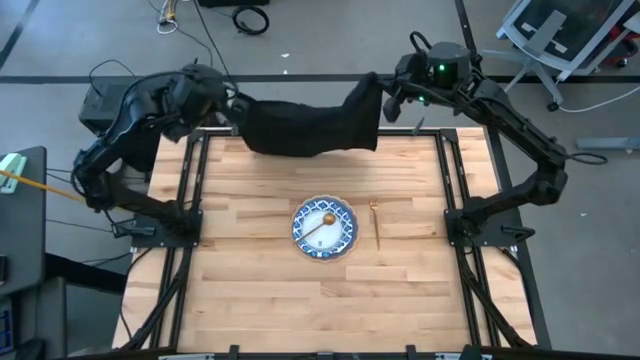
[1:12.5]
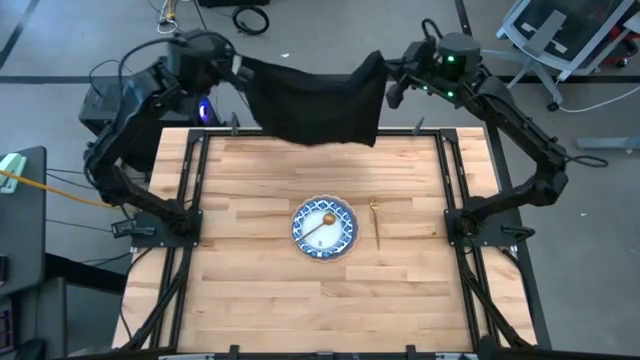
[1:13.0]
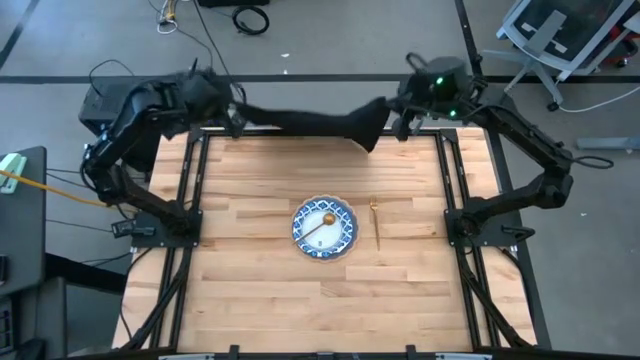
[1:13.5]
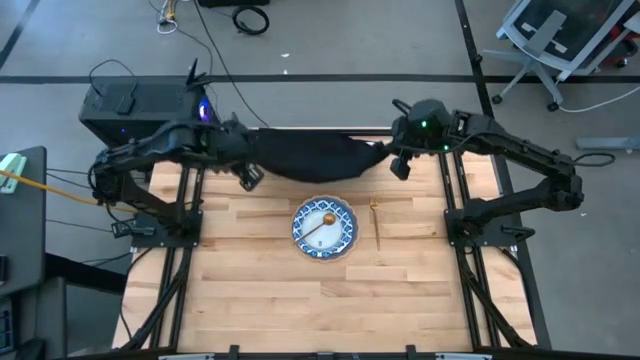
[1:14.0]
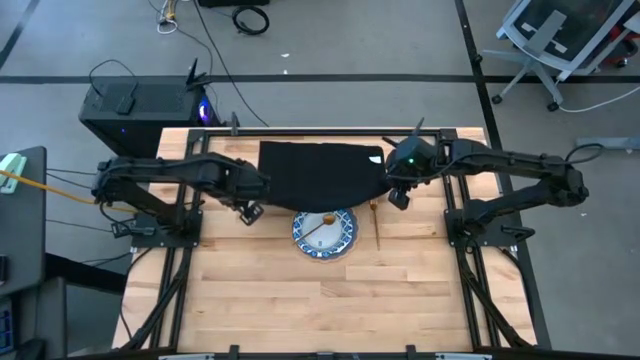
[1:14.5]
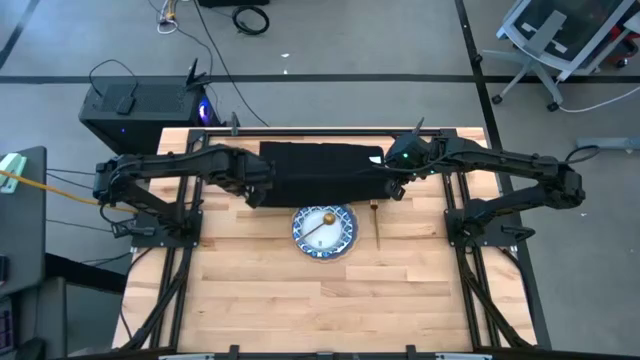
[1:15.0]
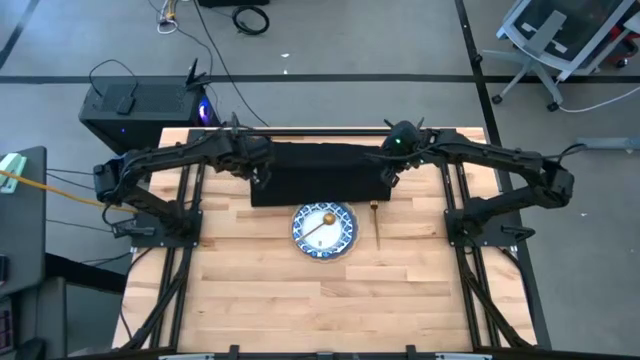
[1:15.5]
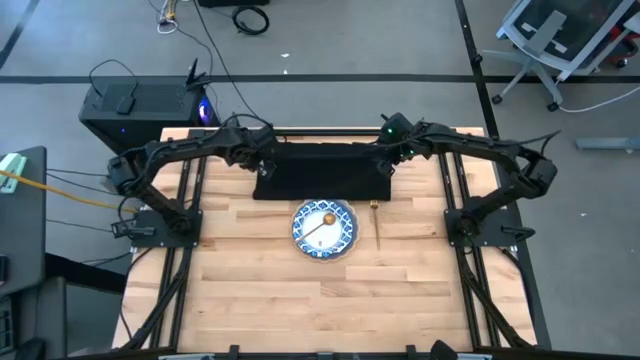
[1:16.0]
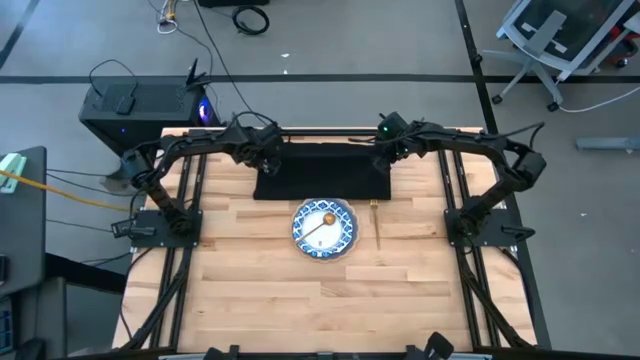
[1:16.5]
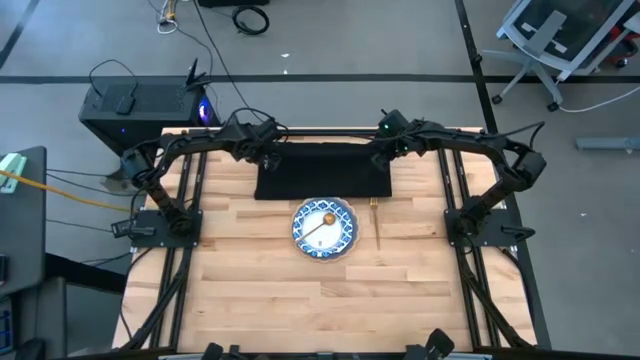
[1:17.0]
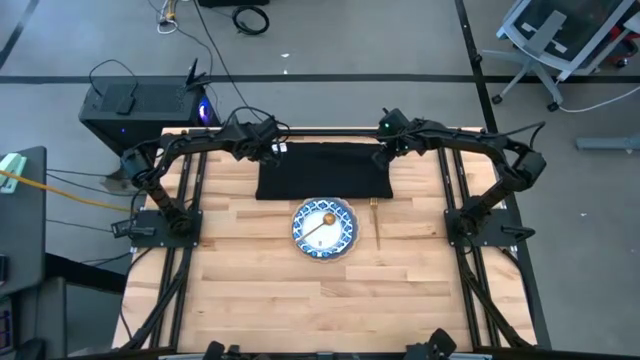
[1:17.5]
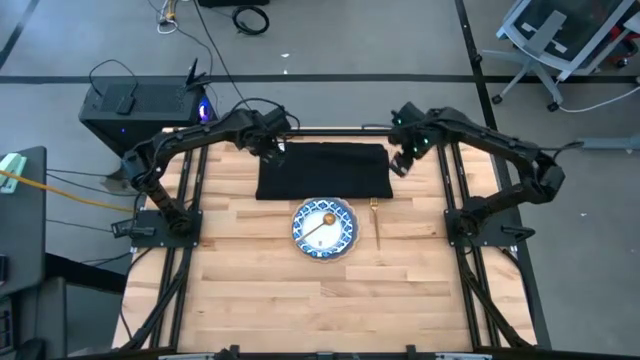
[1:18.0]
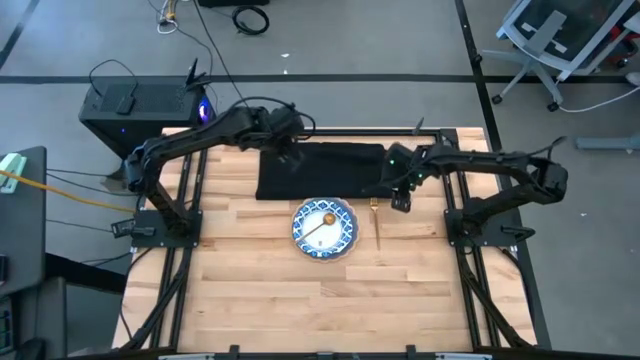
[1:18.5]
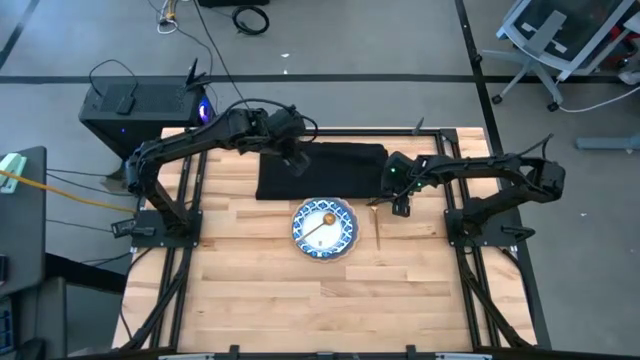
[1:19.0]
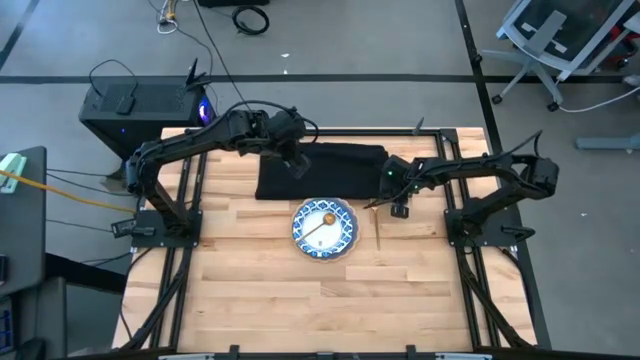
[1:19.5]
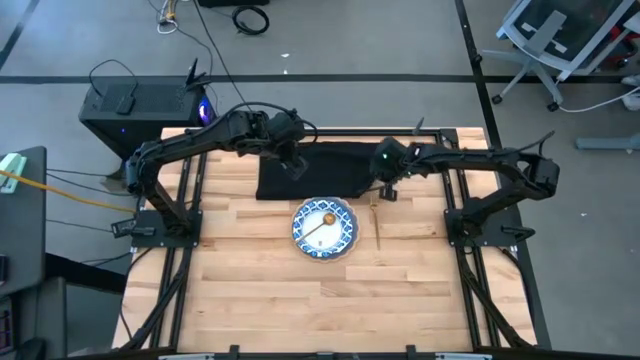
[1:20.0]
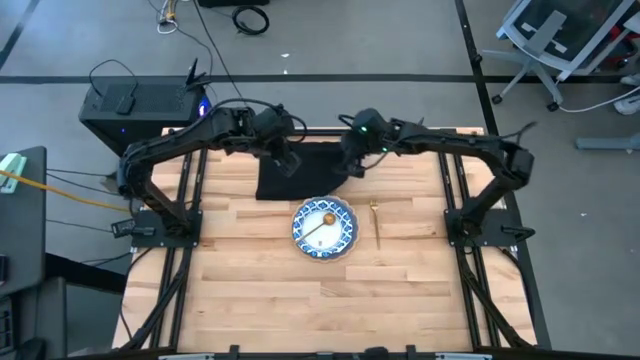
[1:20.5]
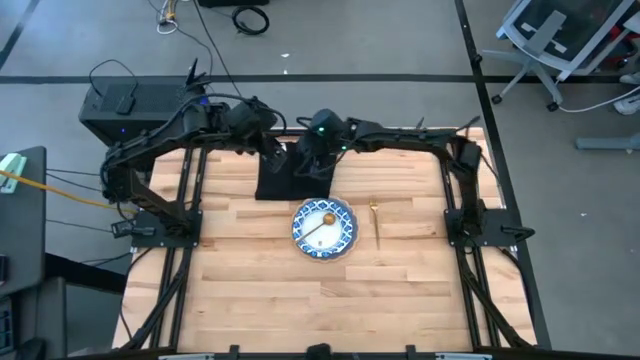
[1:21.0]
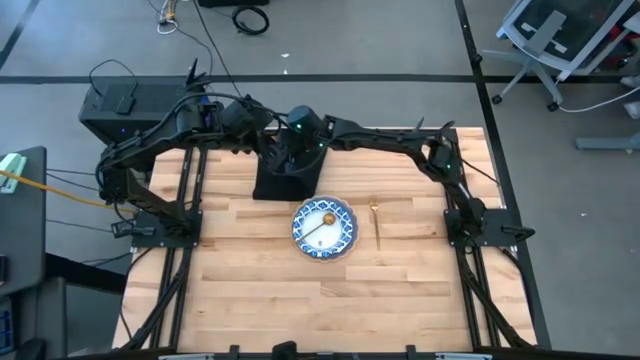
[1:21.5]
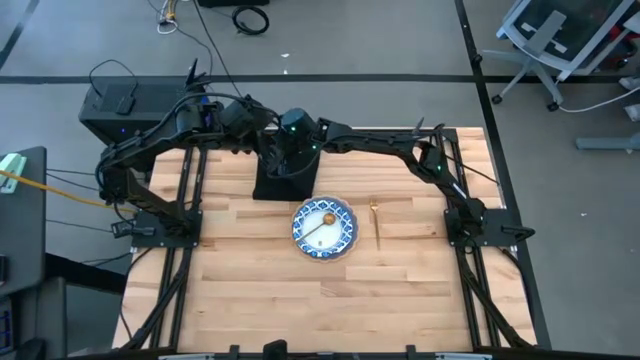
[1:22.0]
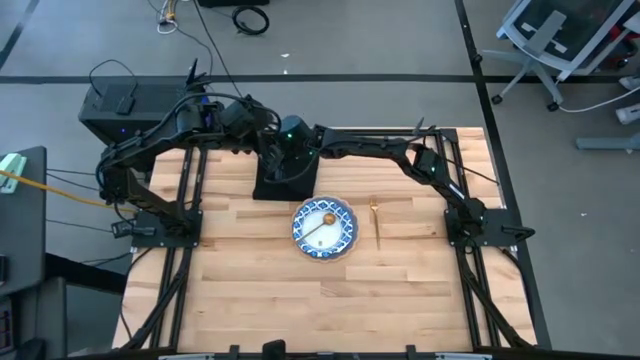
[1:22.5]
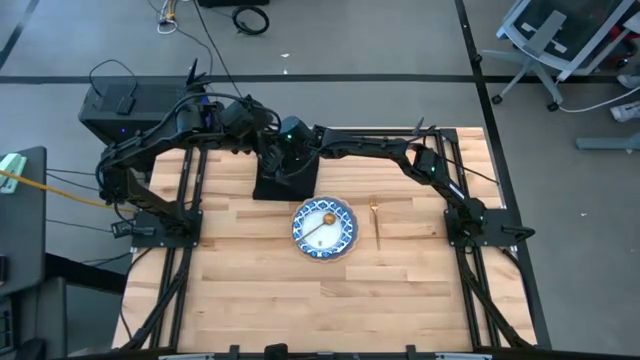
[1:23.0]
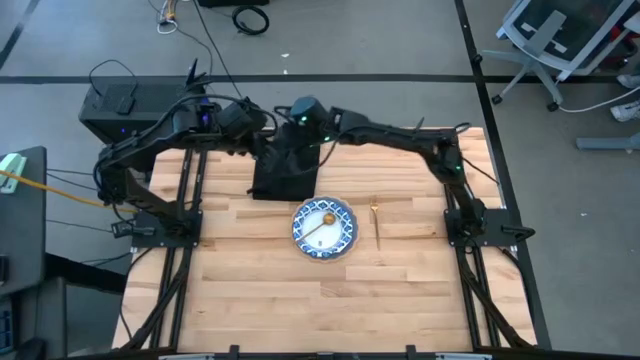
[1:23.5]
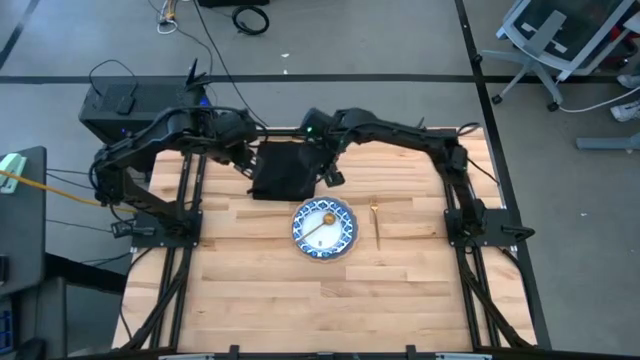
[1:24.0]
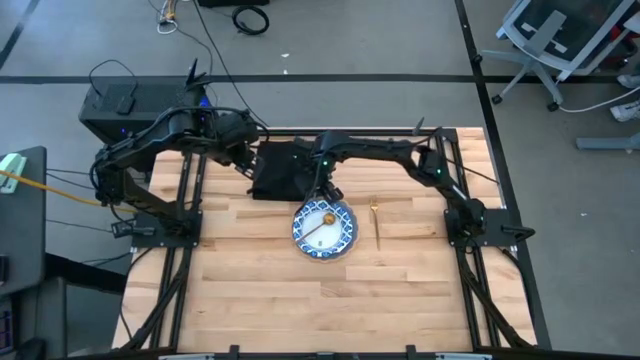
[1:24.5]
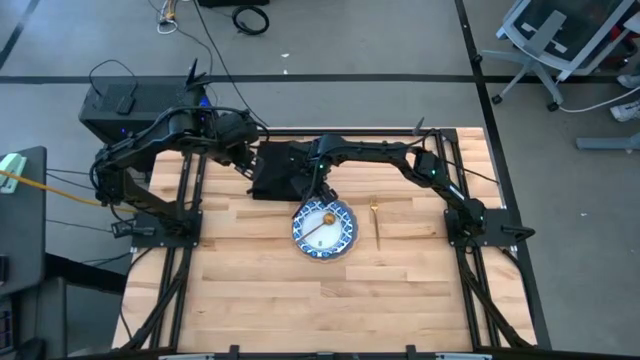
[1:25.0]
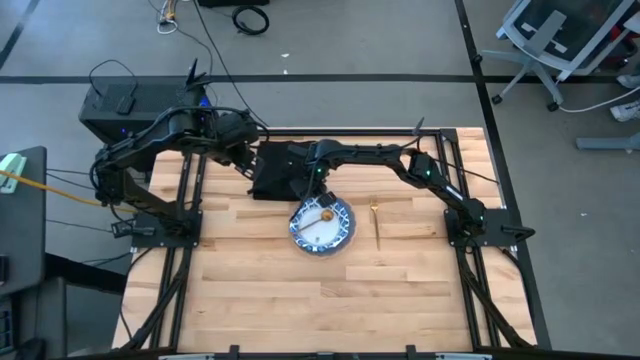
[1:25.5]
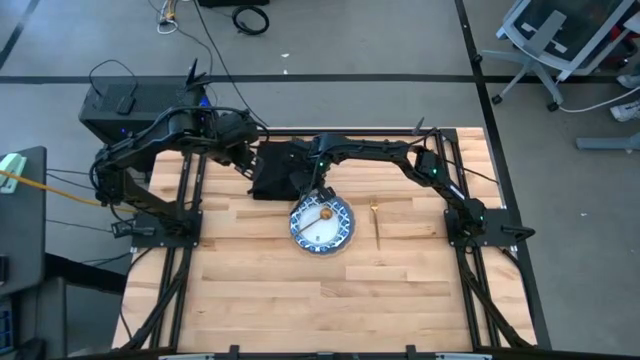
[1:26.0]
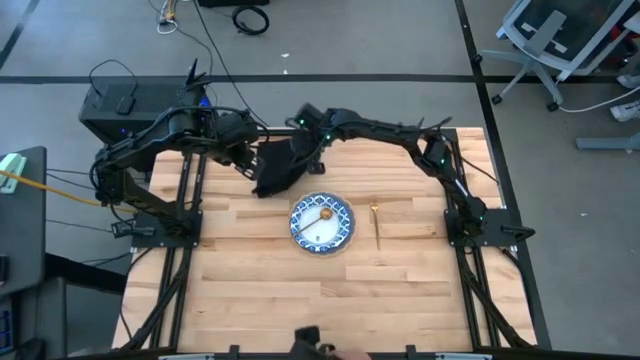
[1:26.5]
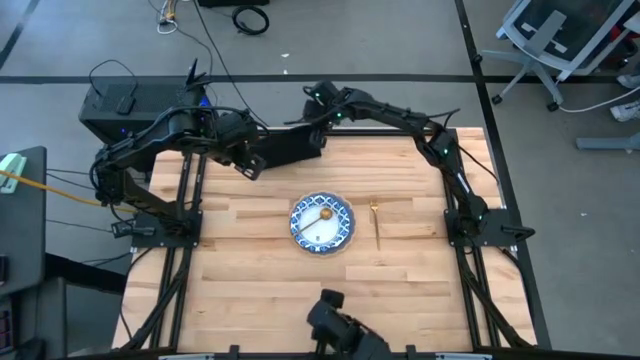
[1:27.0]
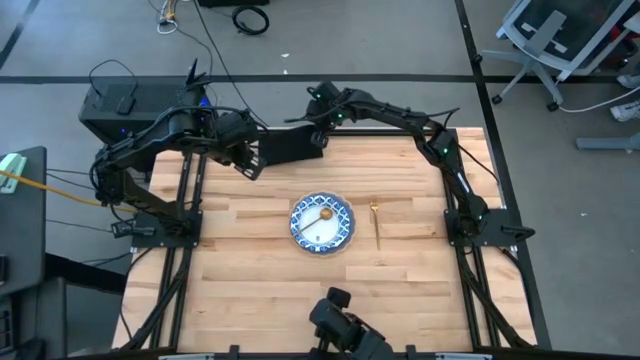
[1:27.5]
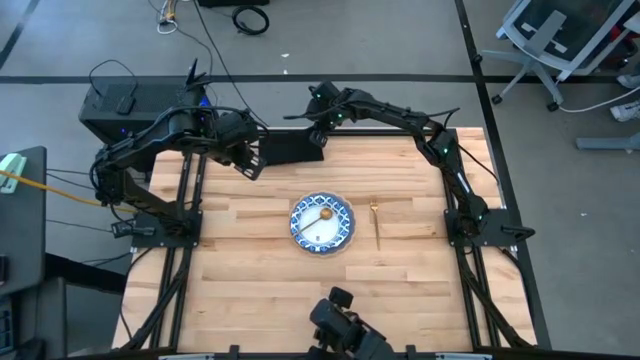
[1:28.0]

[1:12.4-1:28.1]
Task: Set table place
Fold the black napkin

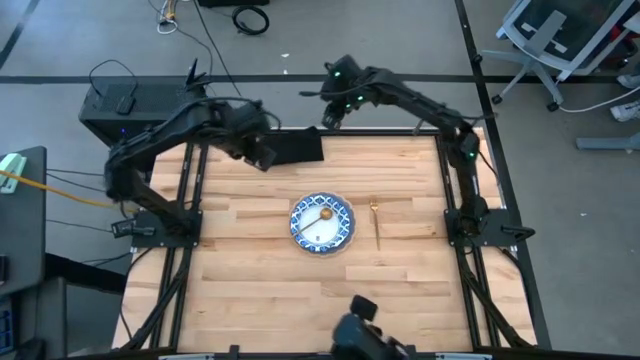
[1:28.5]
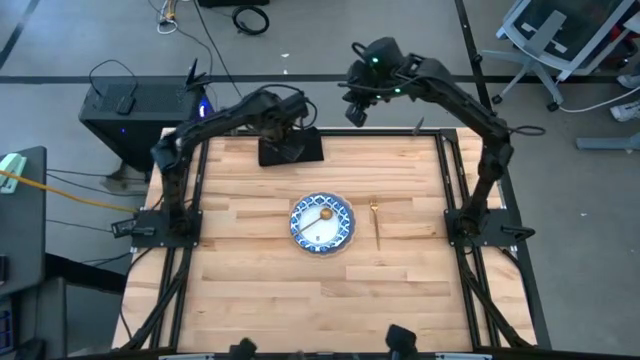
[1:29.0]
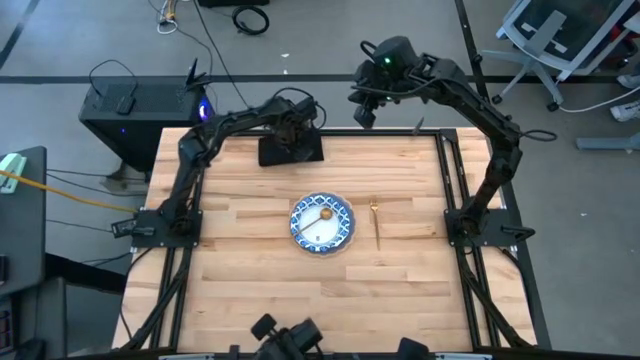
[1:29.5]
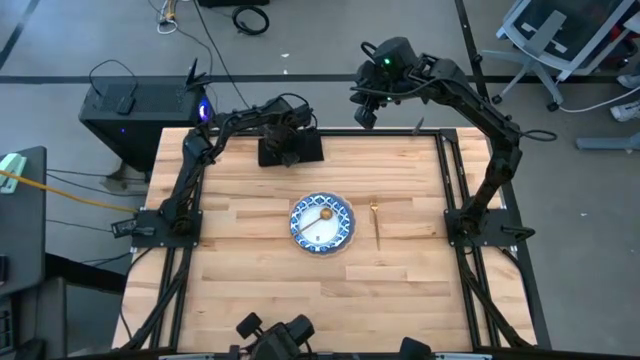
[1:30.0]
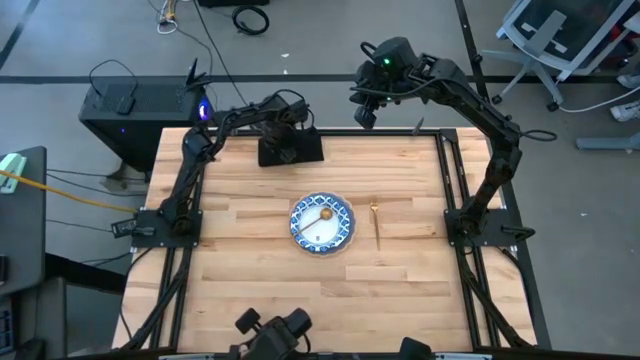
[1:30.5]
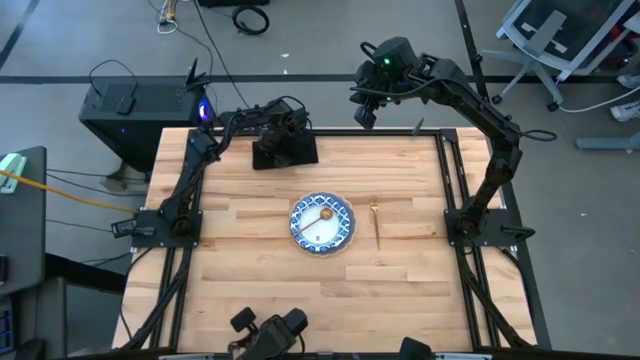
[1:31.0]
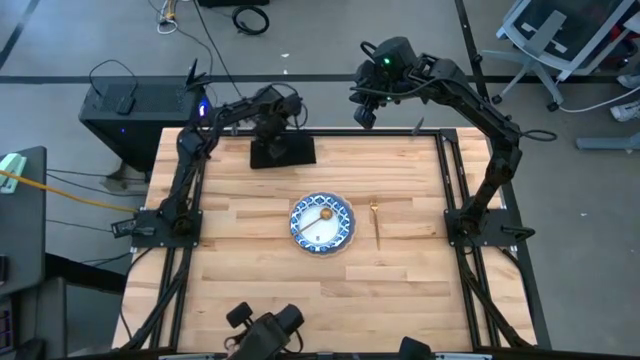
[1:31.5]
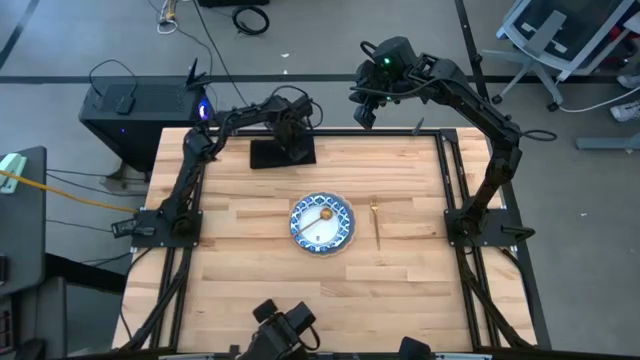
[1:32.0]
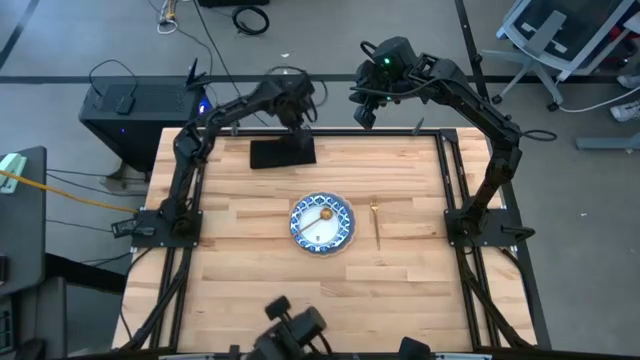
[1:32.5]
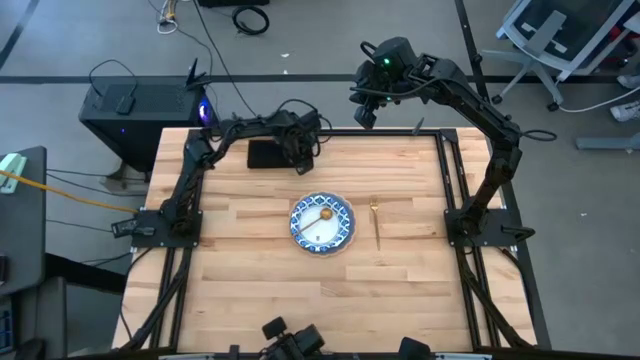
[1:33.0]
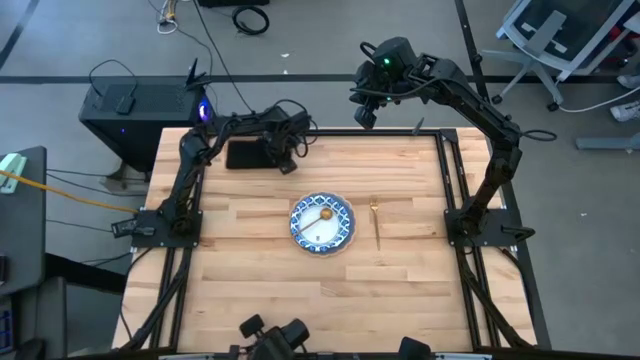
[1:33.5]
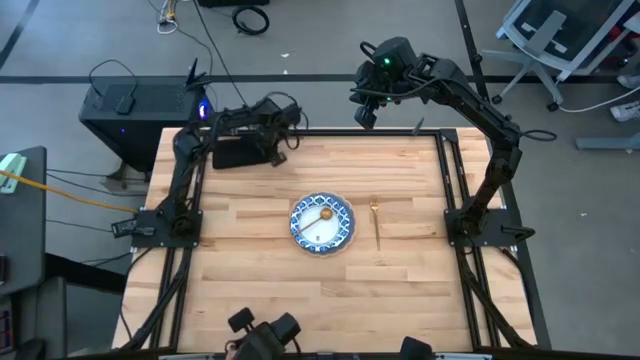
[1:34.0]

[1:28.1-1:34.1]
Move the black napkin to the top left corner of the table
